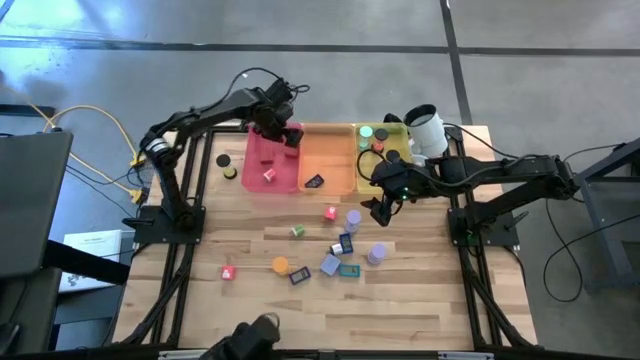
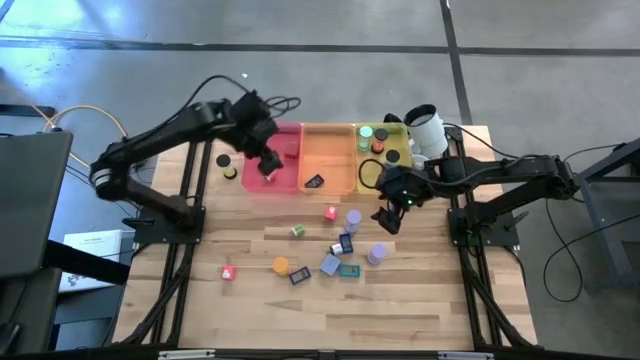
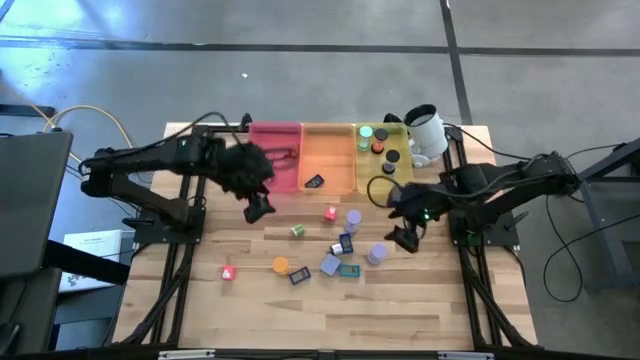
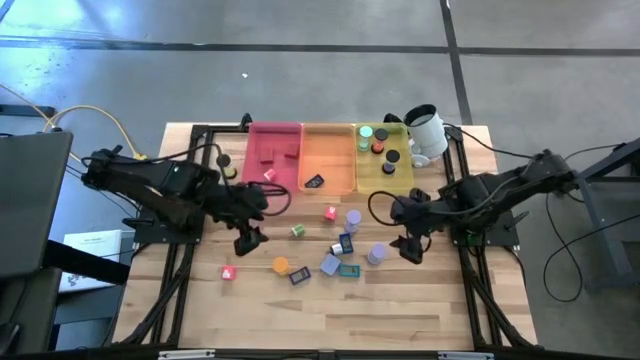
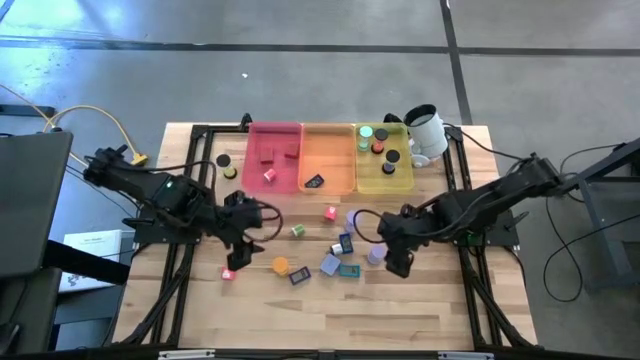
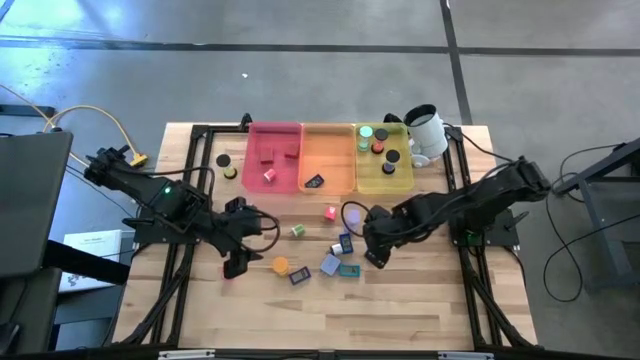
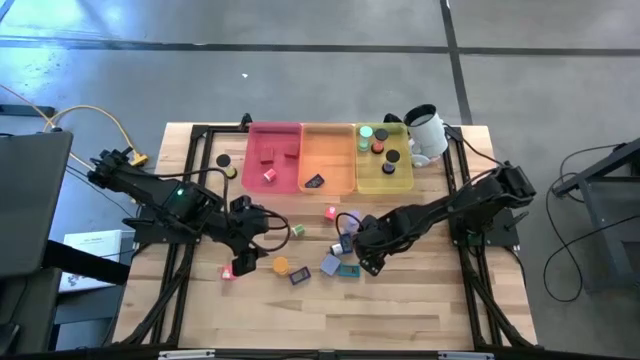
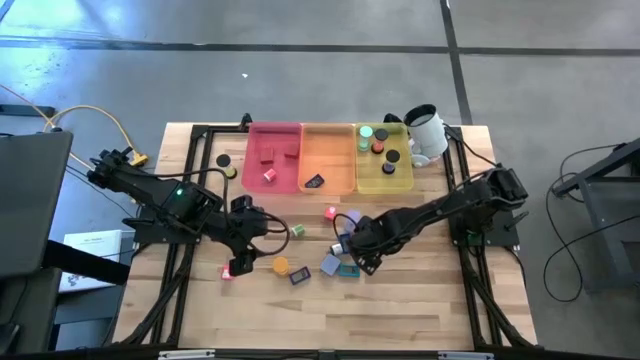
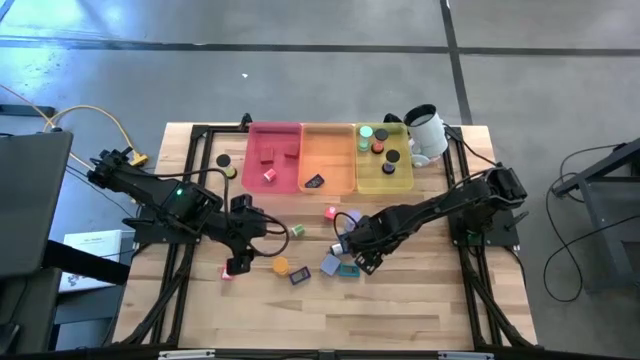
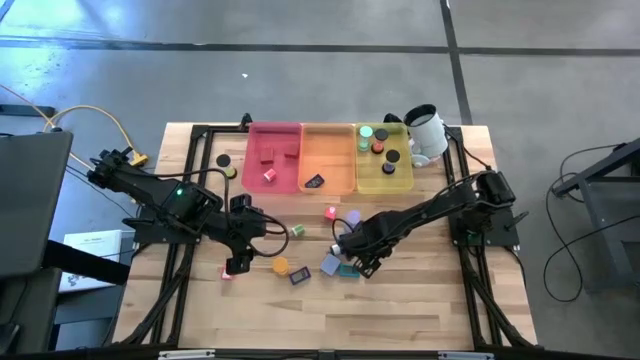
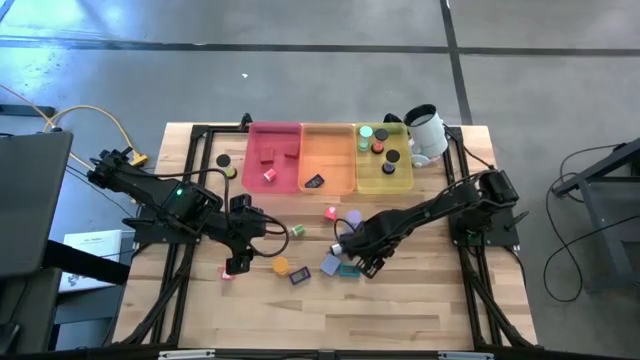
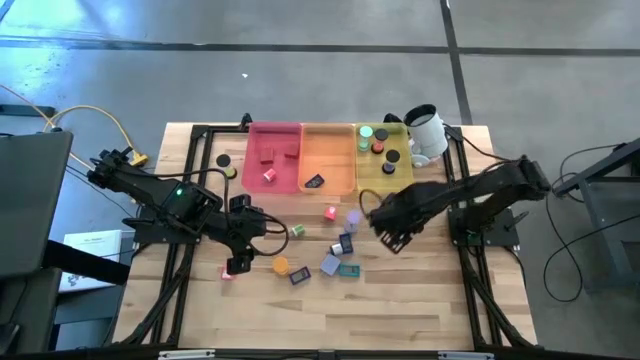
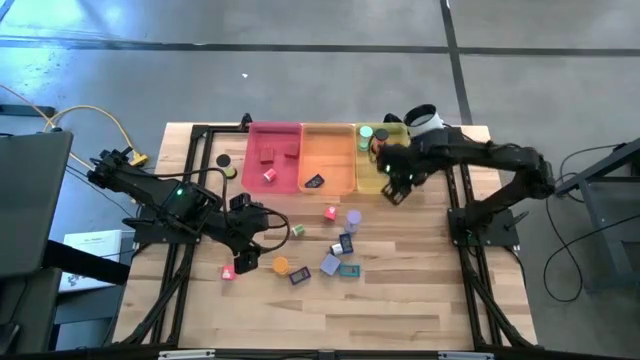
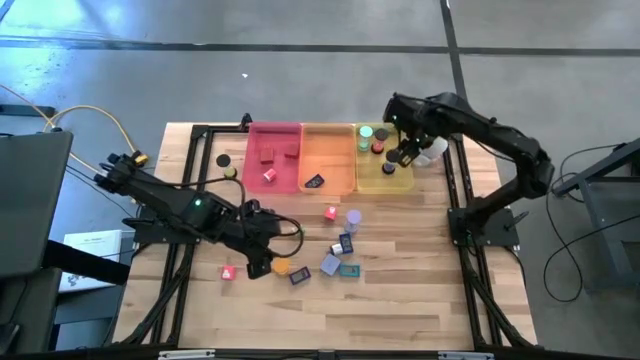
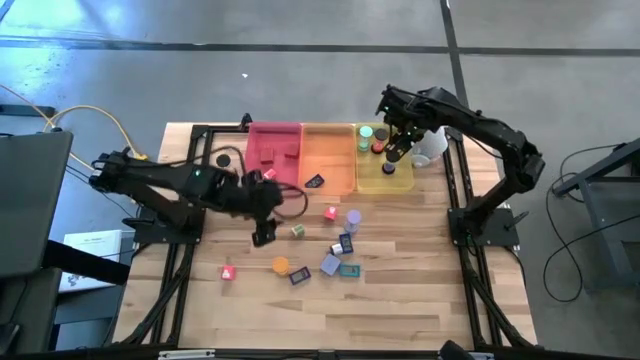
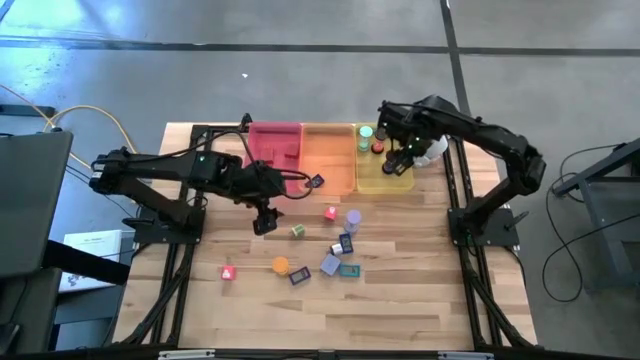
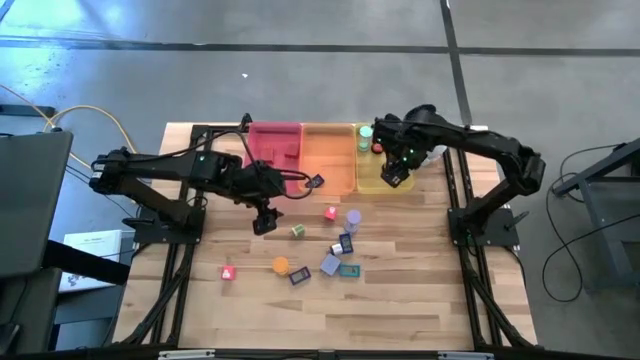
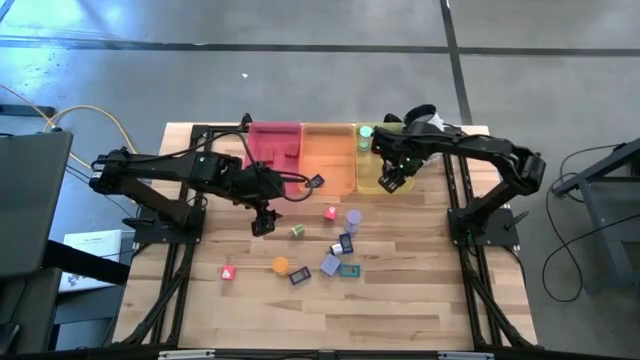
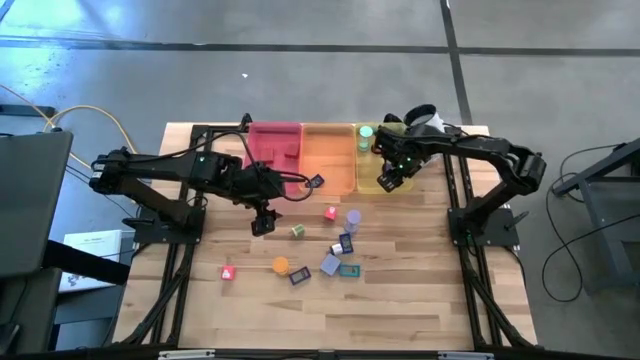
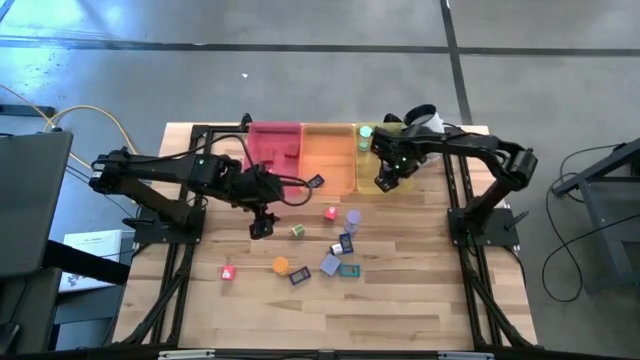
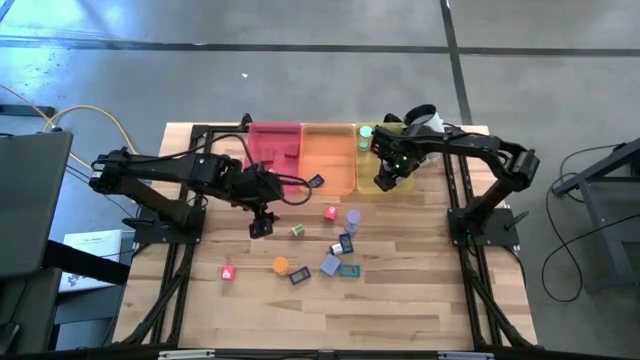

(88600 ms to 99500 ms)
Task: Pick & Place Office items
Put the bottom violet hourglass into the yellow bin

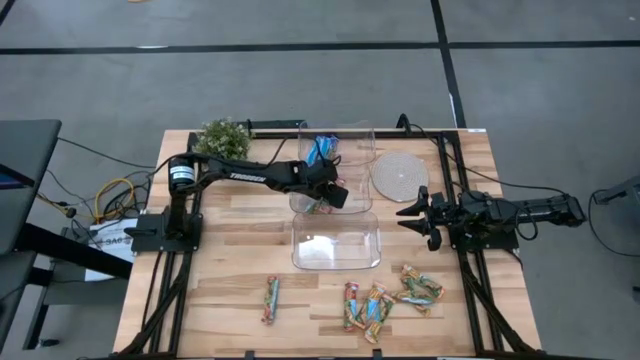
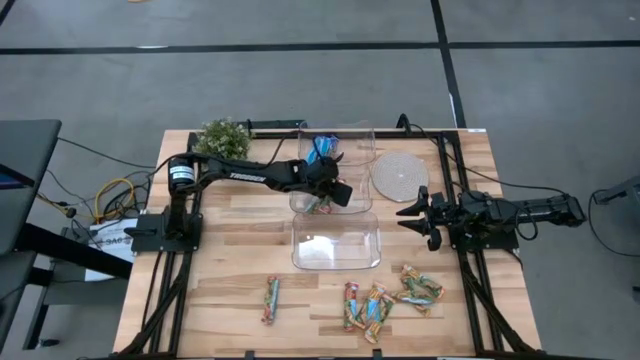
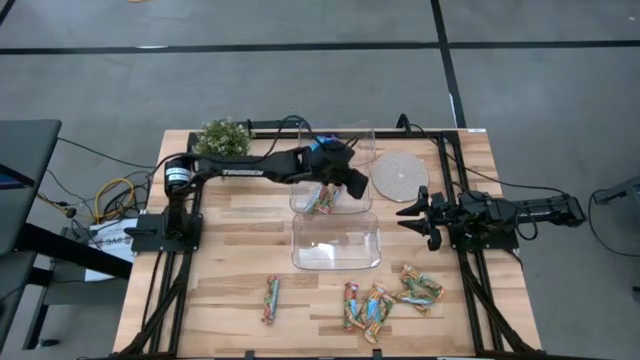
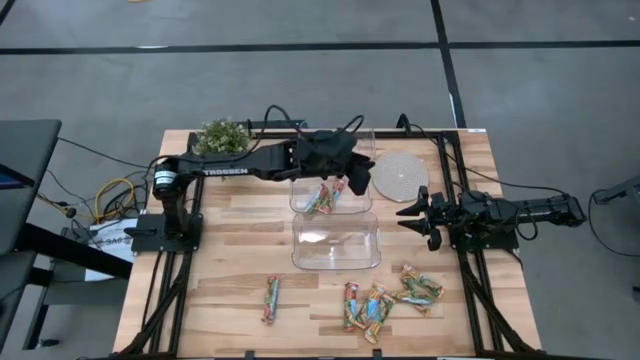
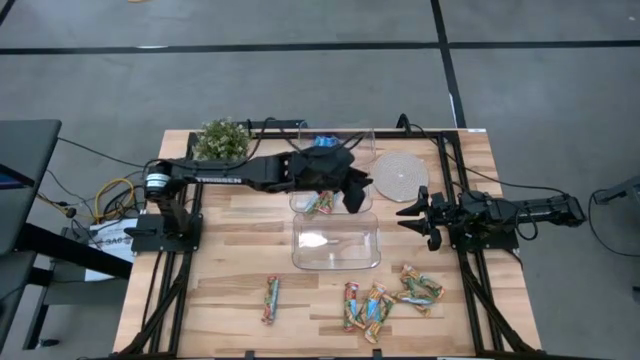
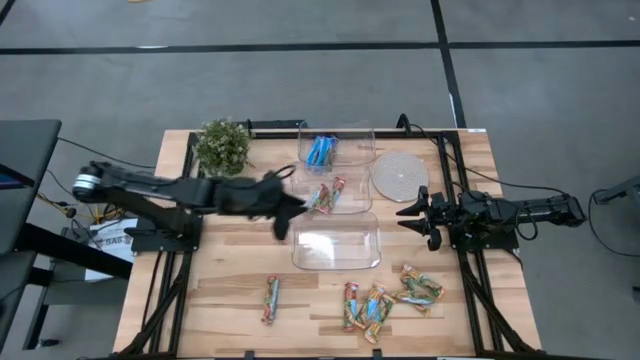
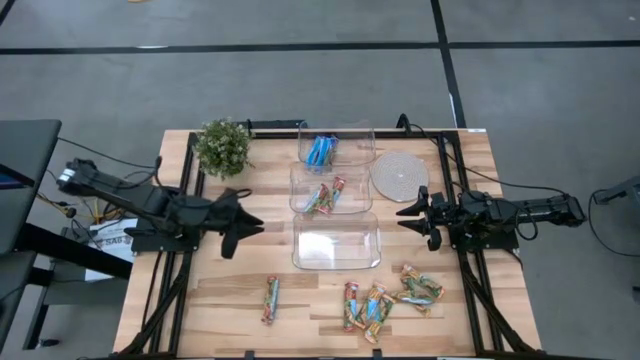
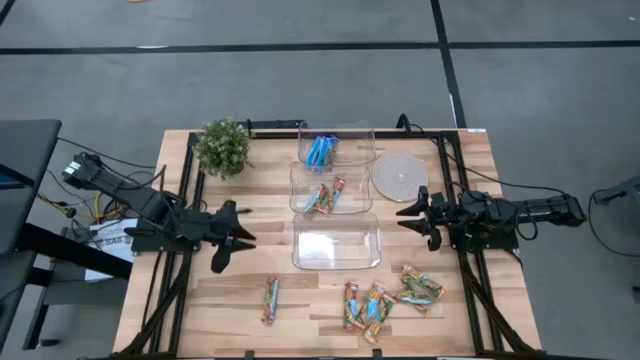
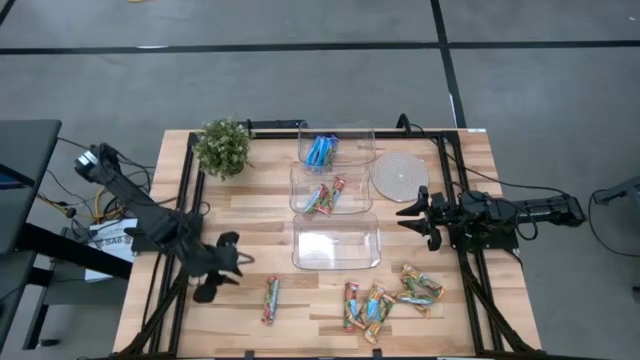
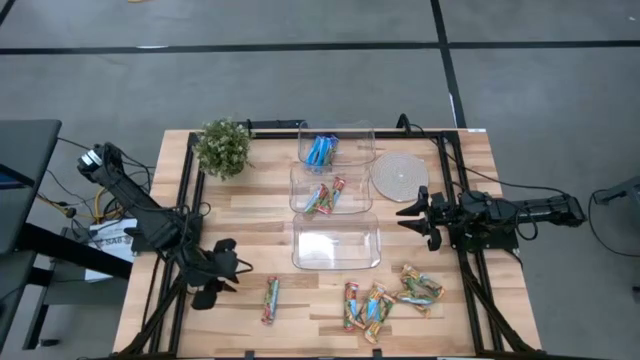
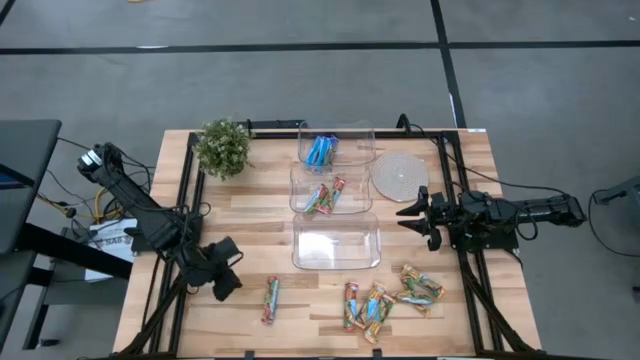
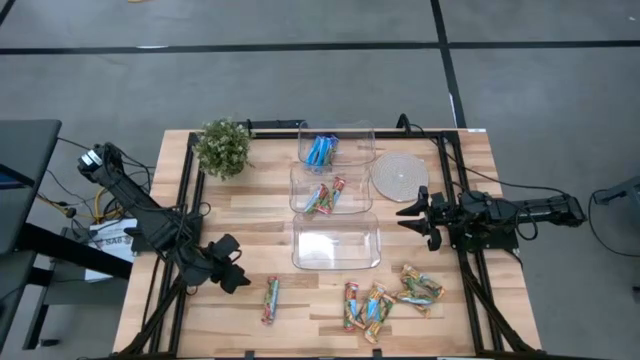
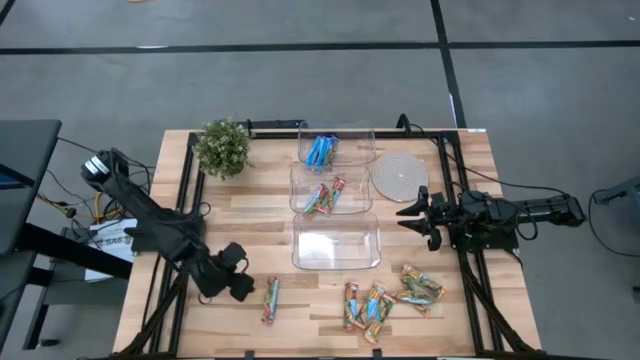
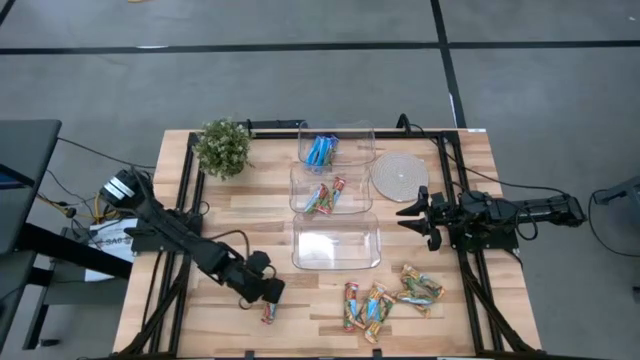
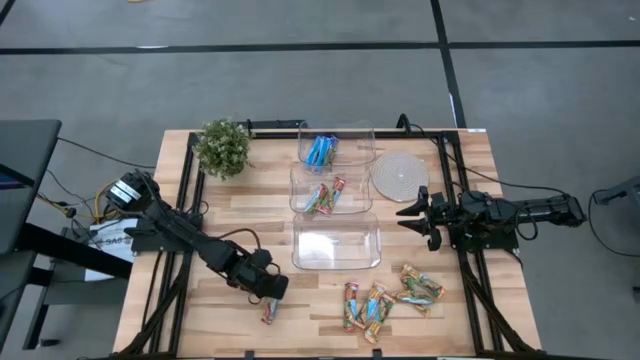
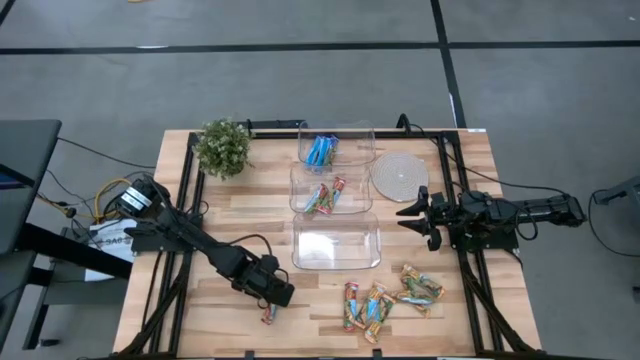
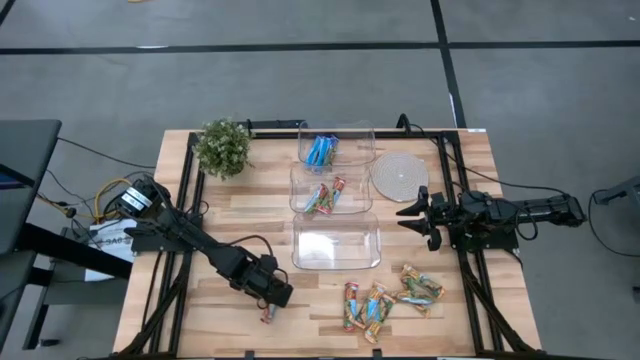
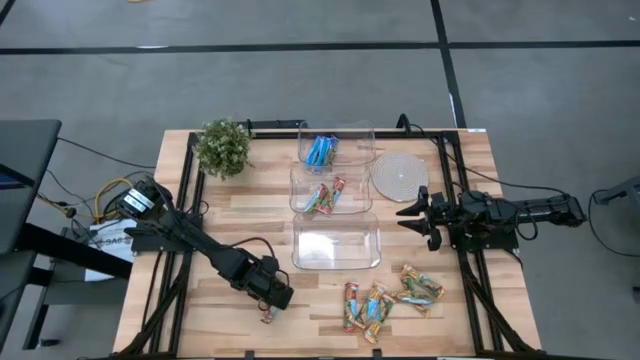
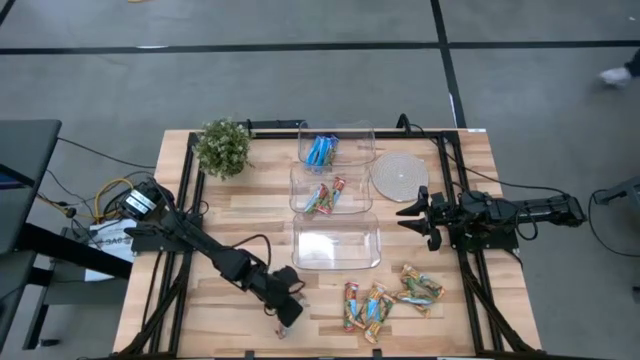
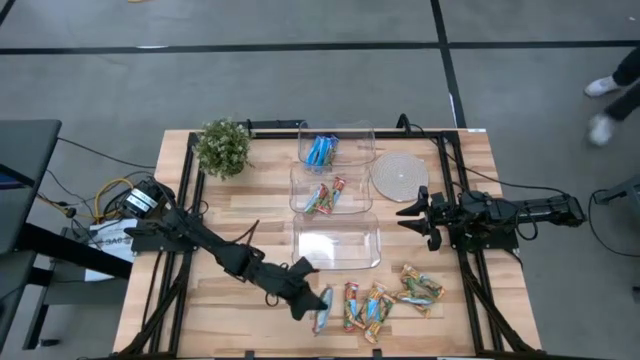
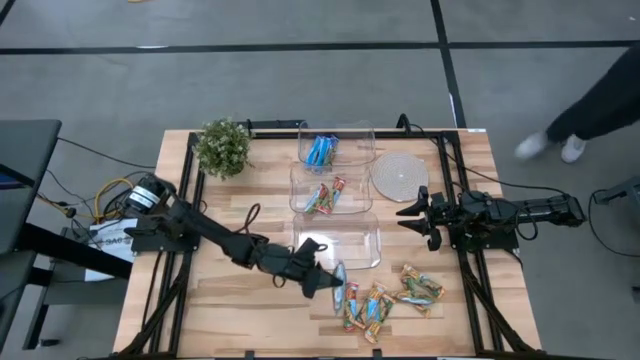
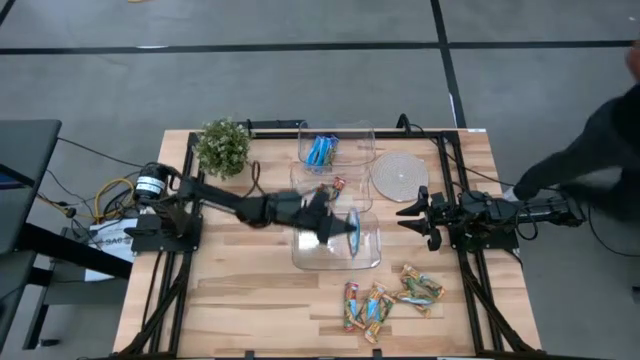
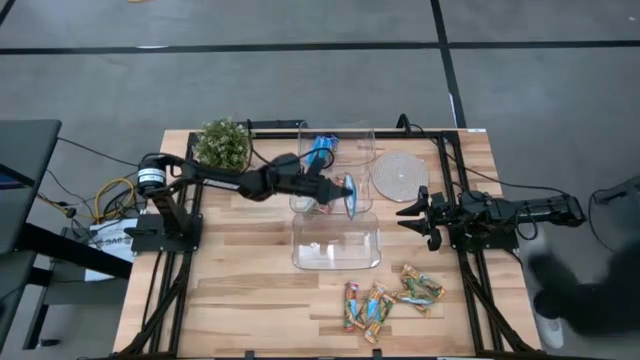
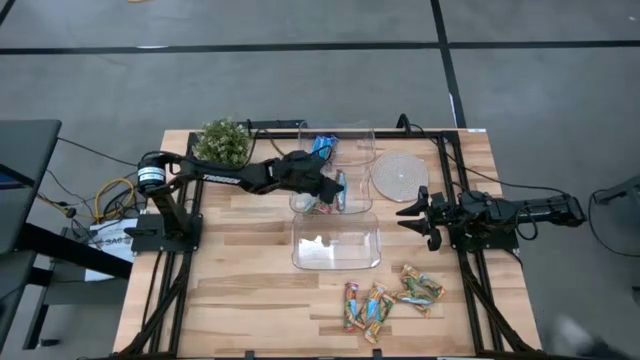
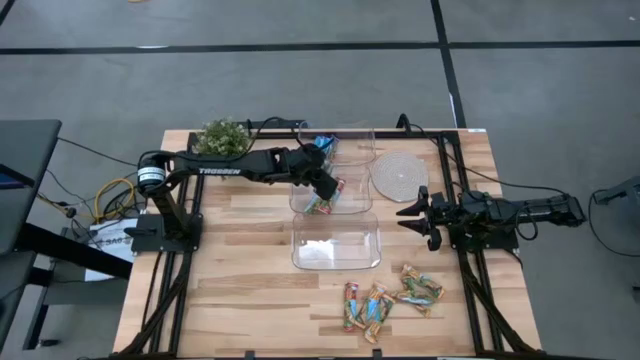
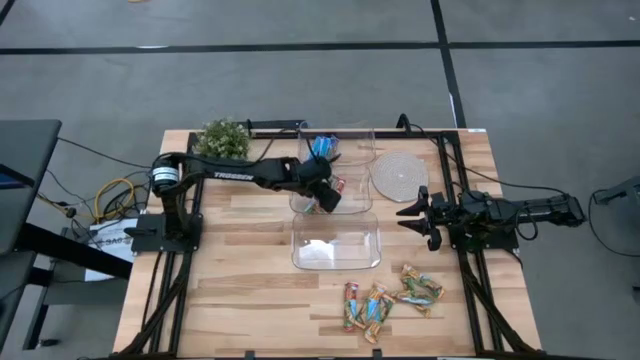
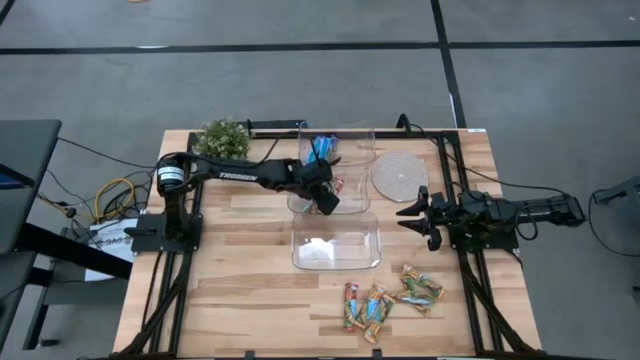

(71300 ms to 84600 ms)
Task: Pick and place Granola Bars by type
Put the red granola bar into the middle transparent bin
